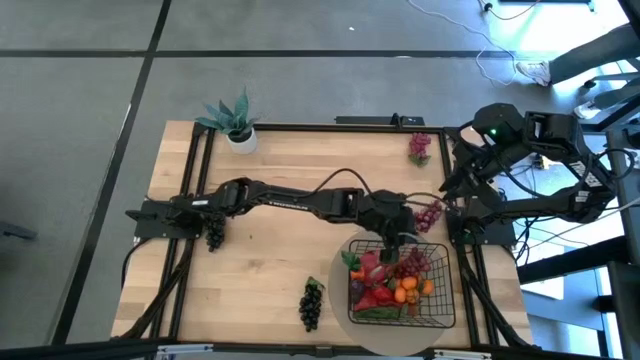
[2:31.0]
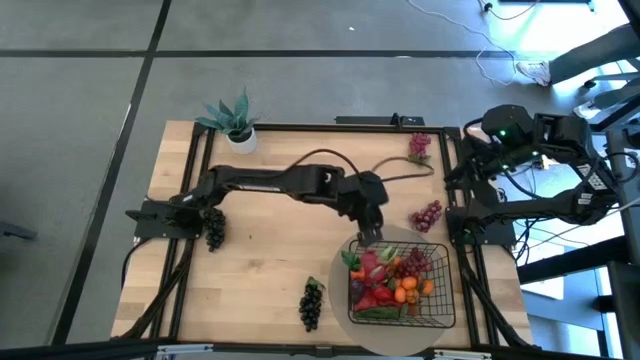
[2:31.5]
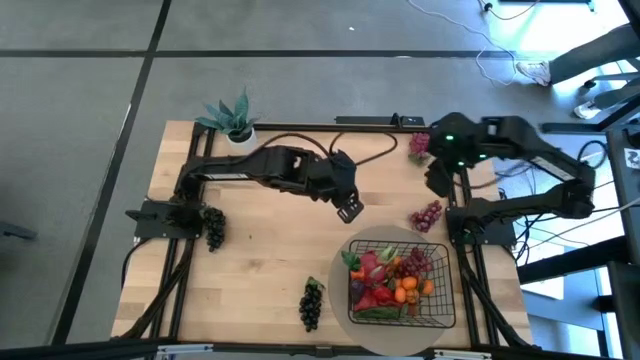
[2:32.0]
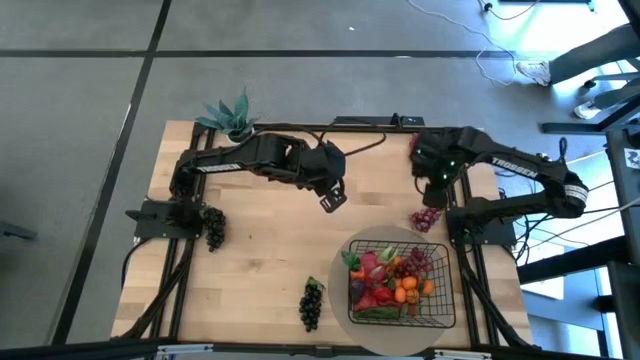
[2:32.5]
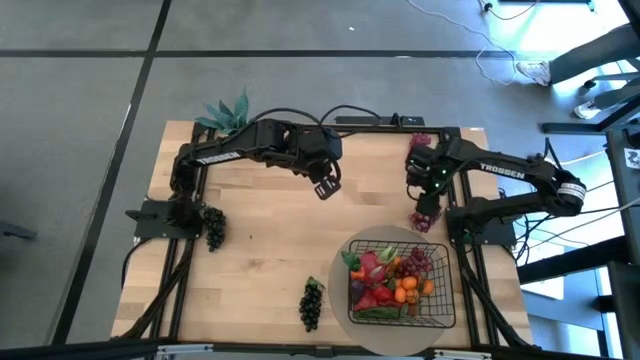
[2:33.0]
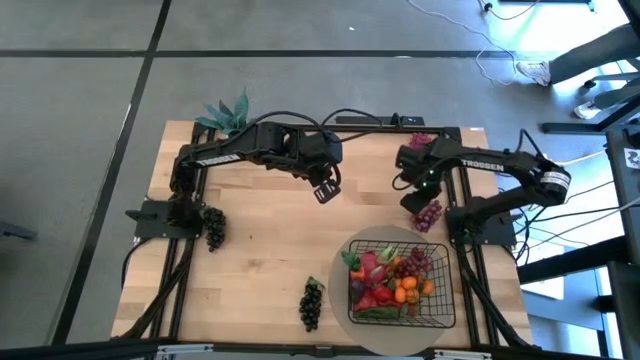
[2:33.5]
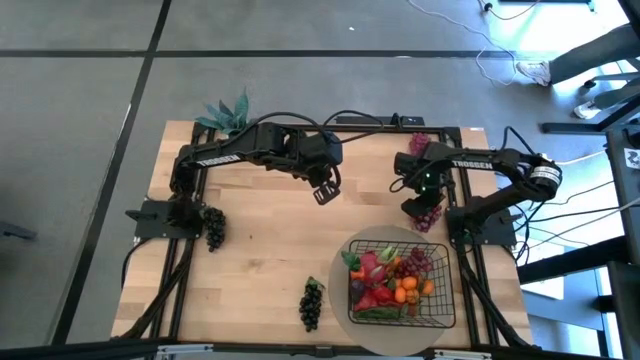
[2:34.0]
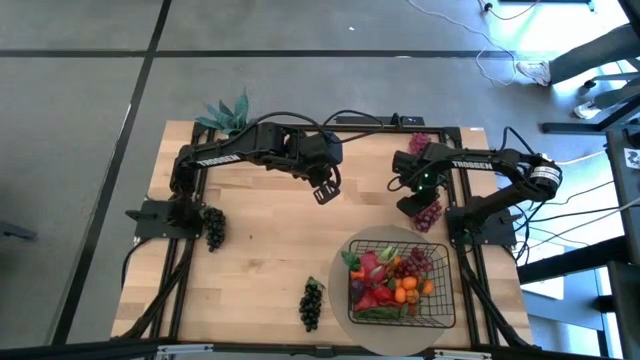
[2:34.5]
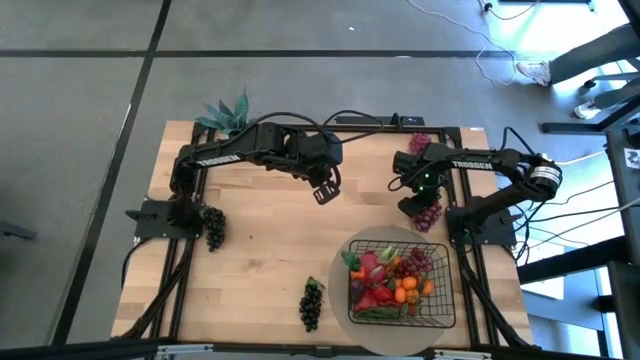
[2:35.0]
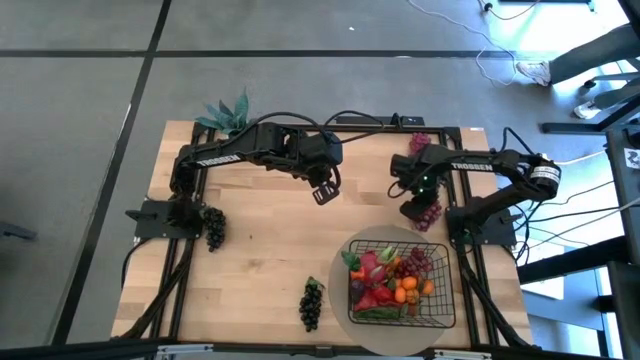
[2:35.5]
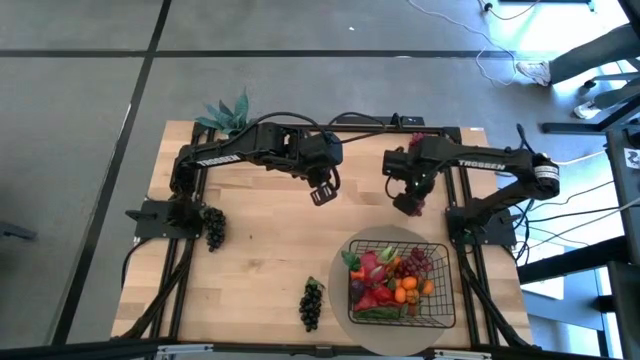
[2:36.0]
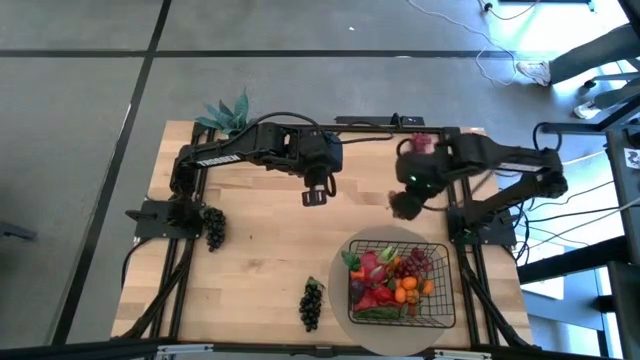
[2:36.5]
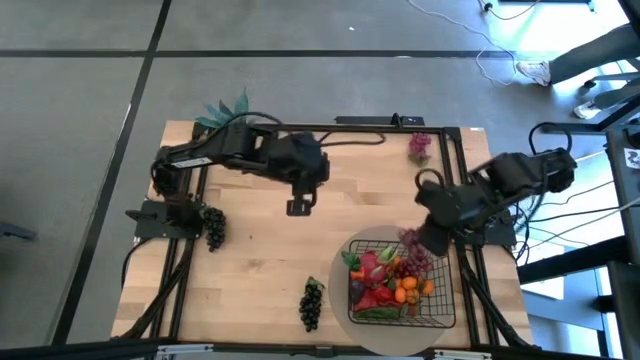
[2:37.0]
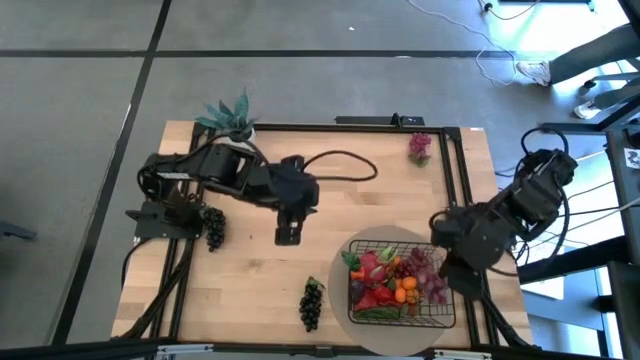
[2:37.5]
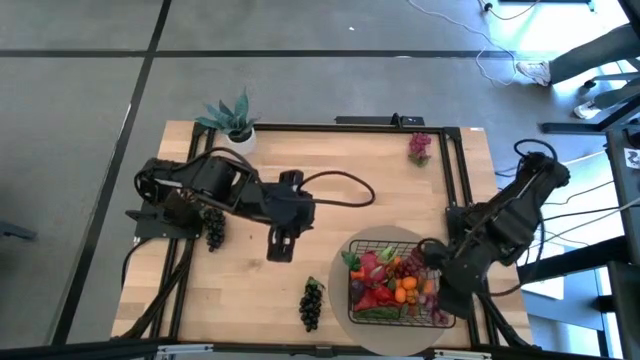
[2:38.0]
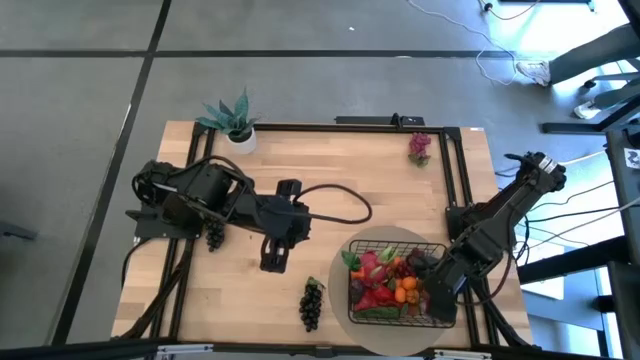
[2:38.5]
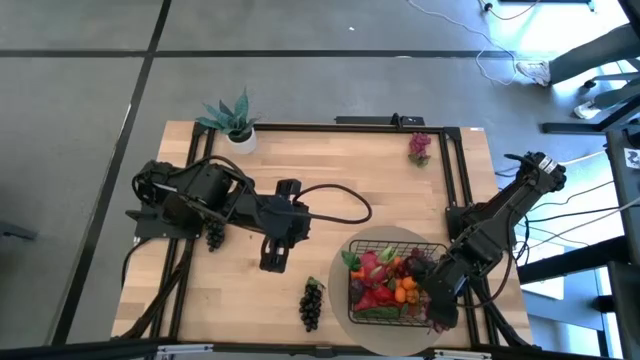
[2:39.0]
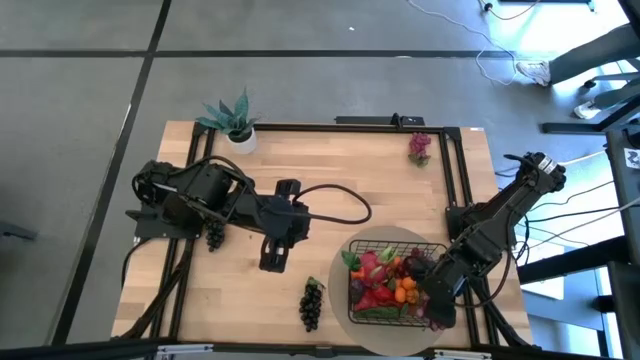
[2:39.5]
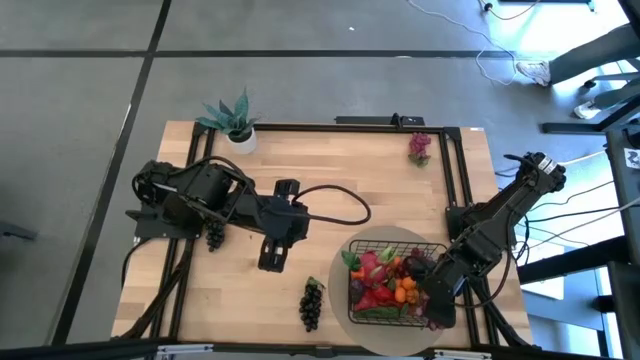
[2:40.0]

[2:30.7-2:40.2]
Task: Build produce basket
Put the bottom red grapes into the black wire basket

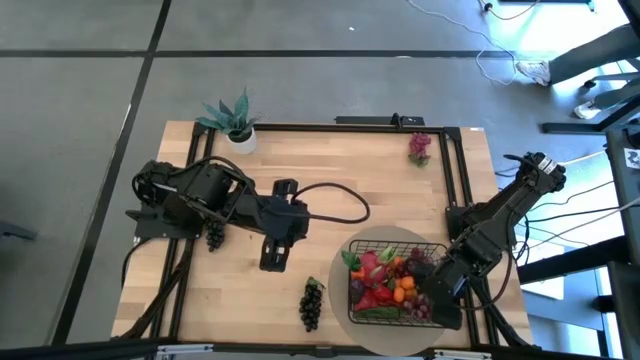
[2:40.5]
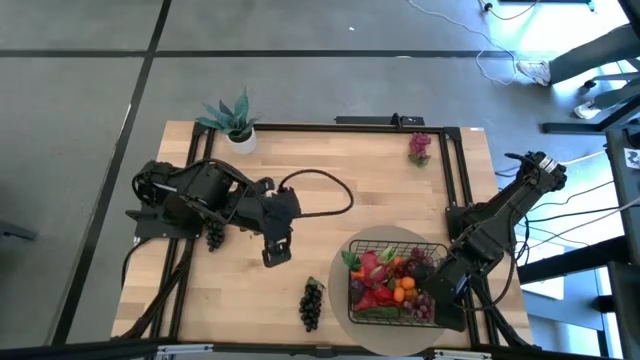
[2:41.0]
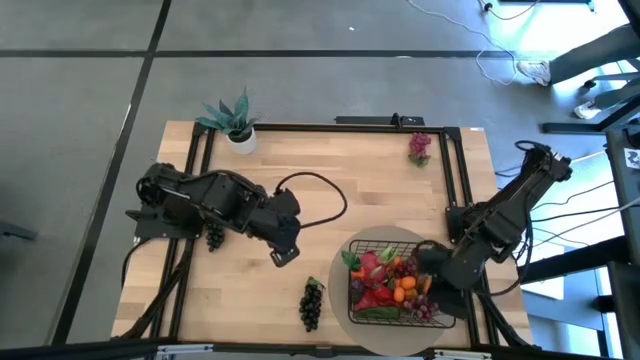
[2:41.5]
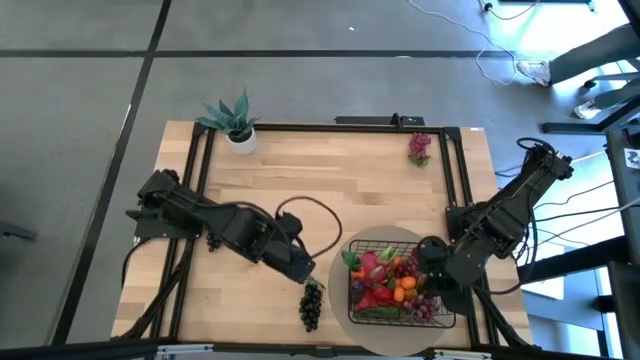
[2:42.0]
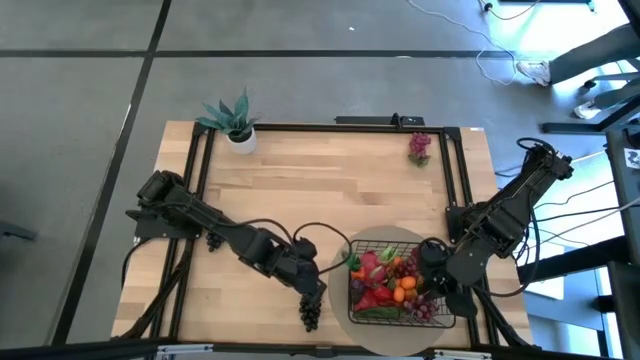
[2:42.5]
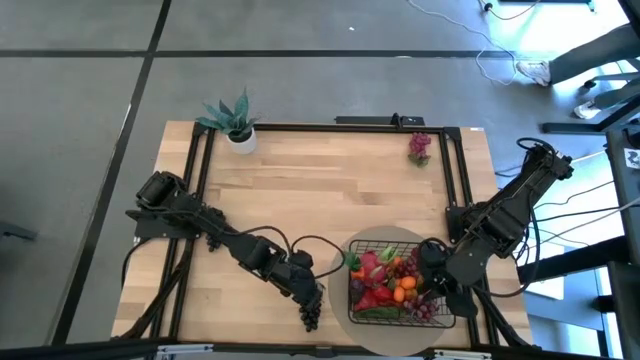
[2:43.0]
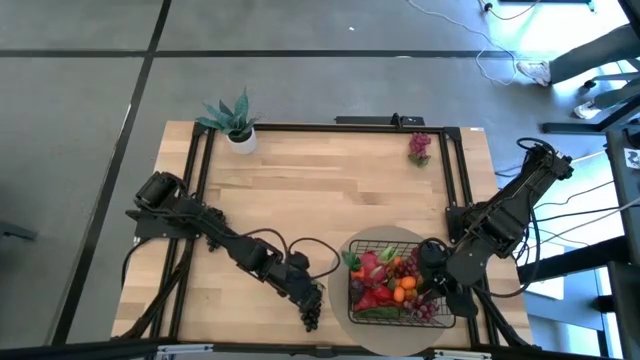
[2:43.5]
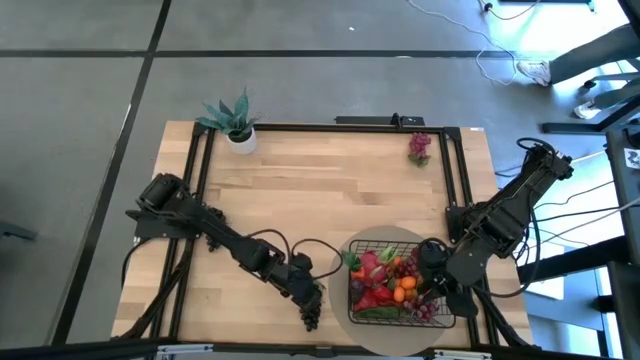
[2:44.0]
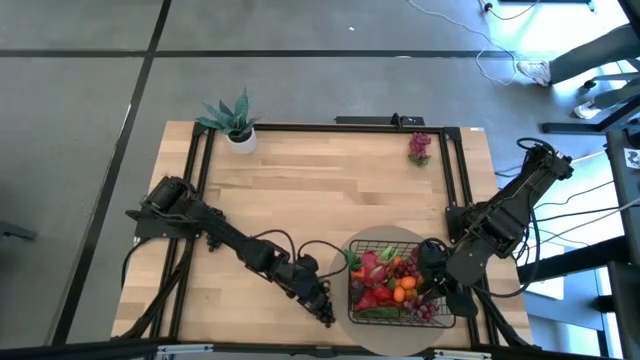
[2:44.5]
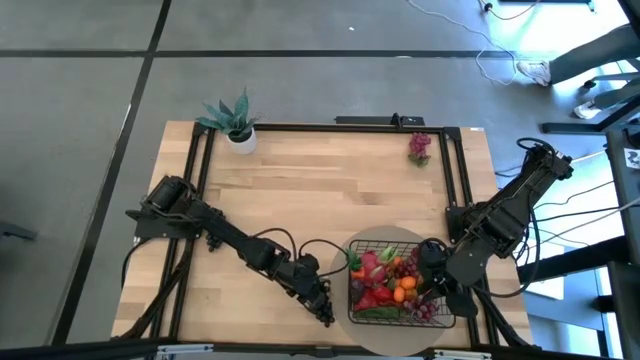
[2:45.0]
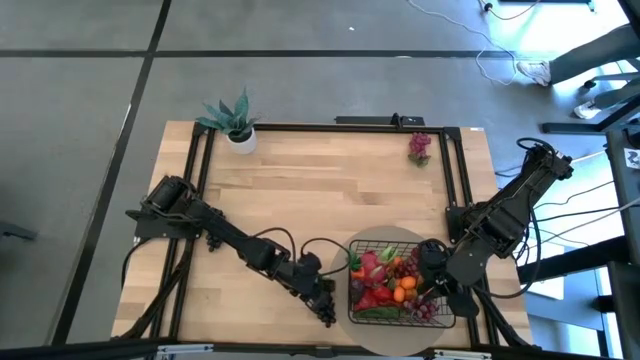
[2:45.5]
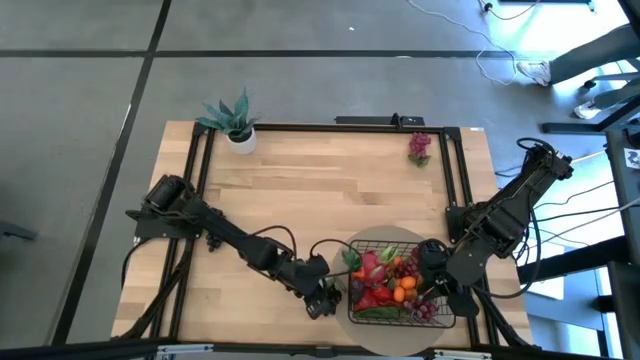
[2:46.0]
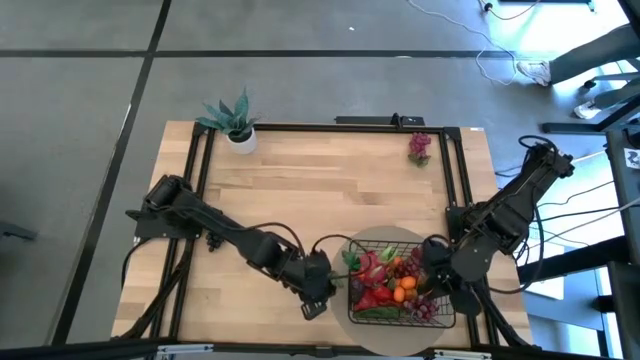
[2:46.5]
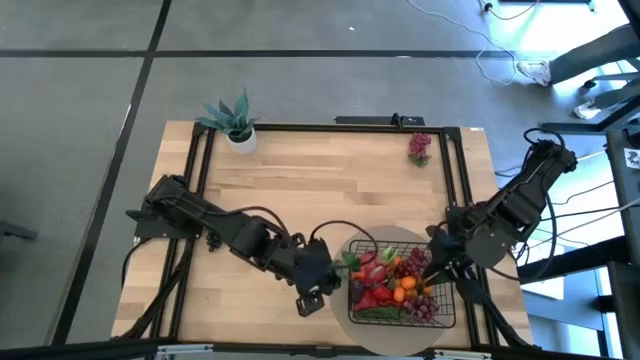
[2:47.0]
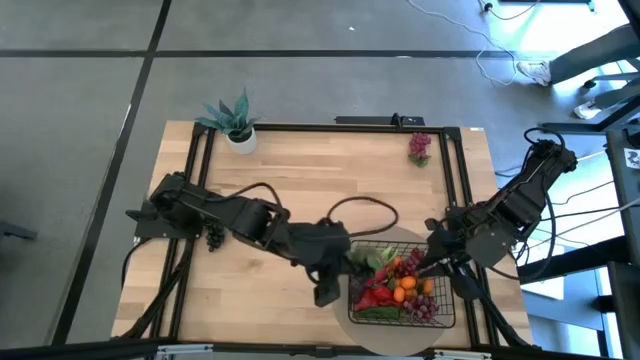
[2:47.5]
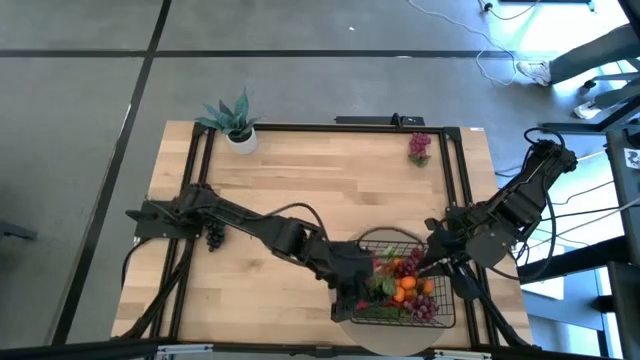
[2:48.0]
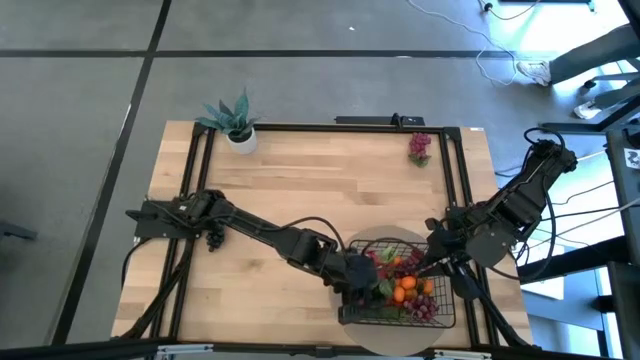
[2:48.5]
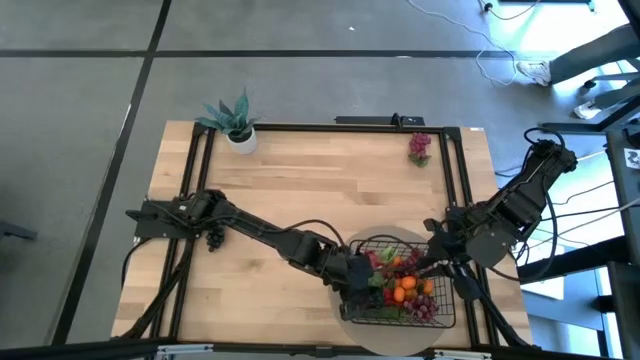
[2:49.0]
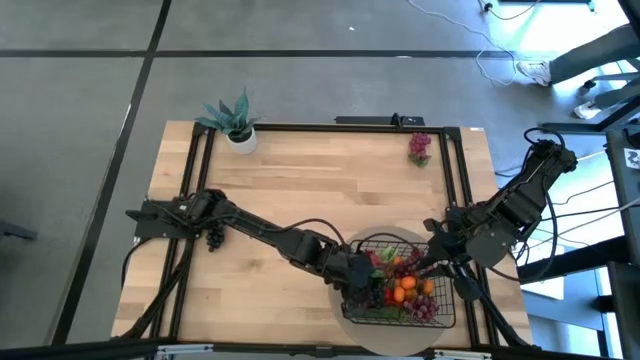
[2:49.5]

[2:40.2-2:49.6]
Put the bottom black grapes into the black wire basket

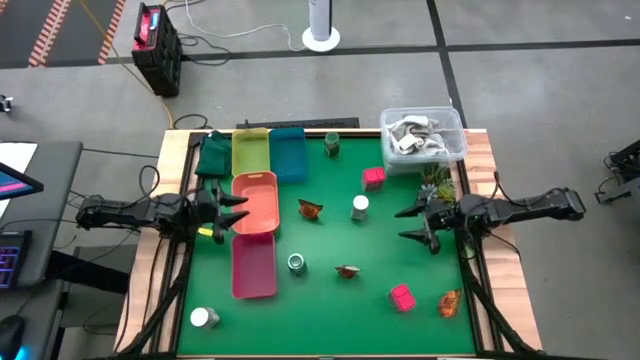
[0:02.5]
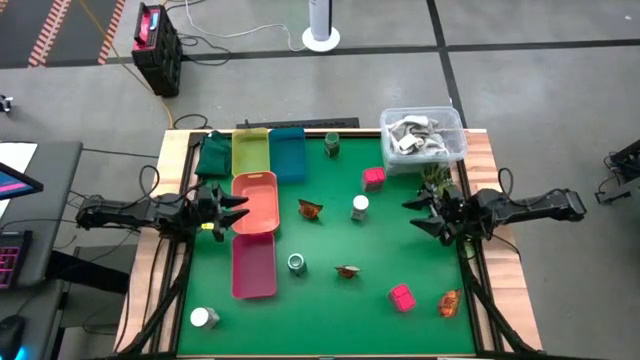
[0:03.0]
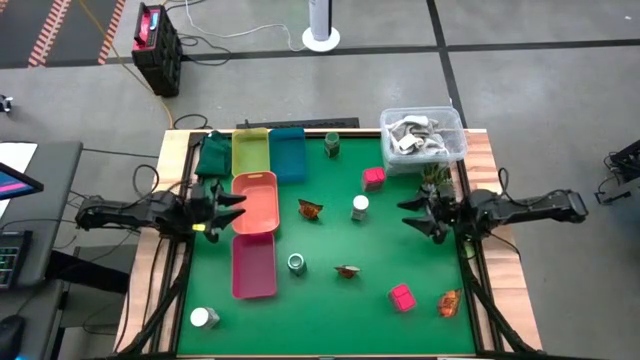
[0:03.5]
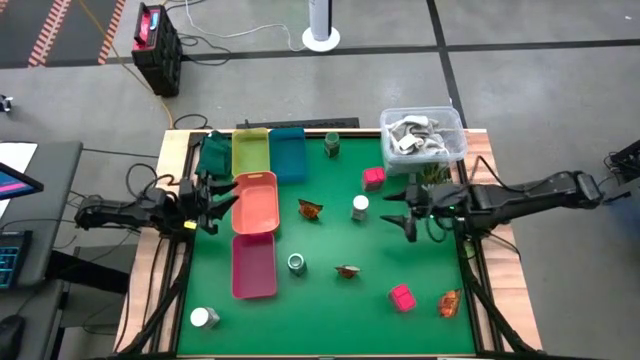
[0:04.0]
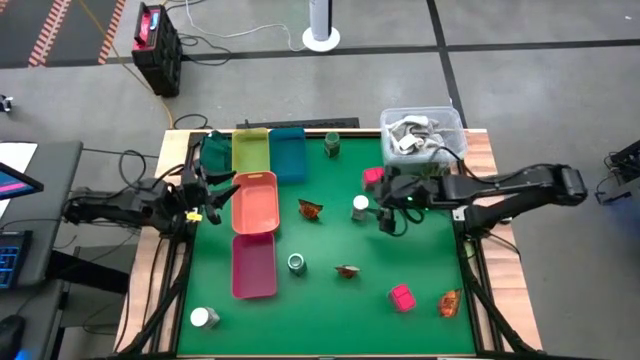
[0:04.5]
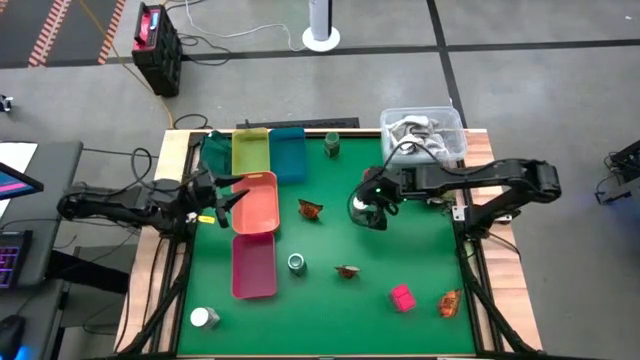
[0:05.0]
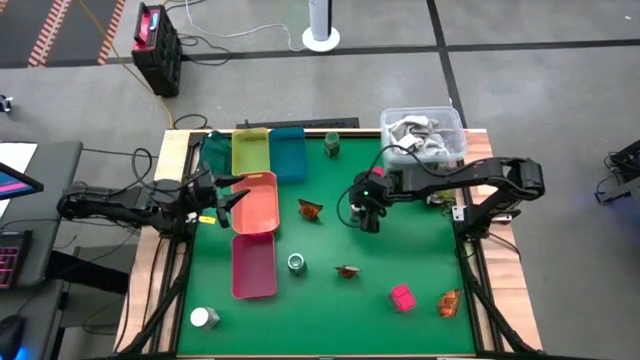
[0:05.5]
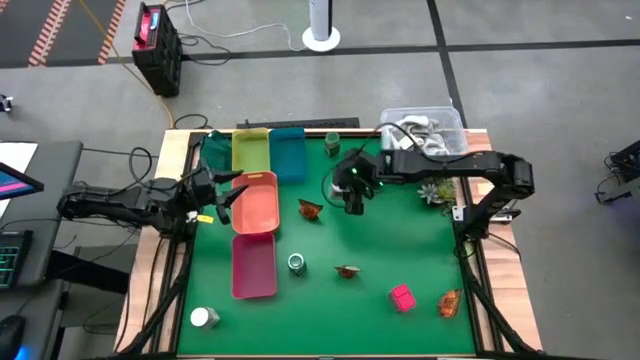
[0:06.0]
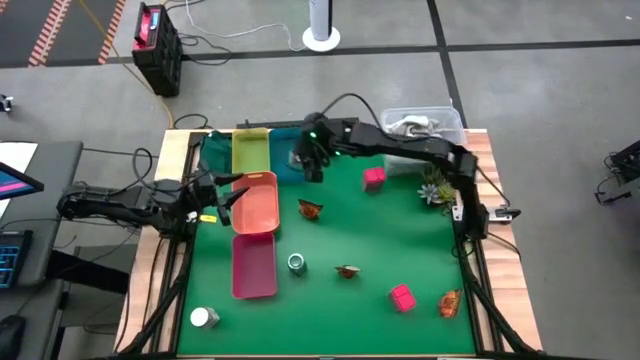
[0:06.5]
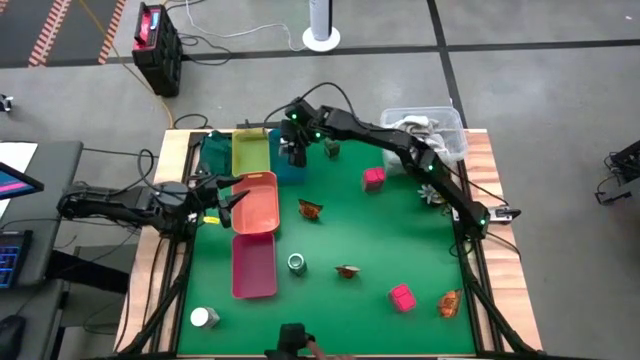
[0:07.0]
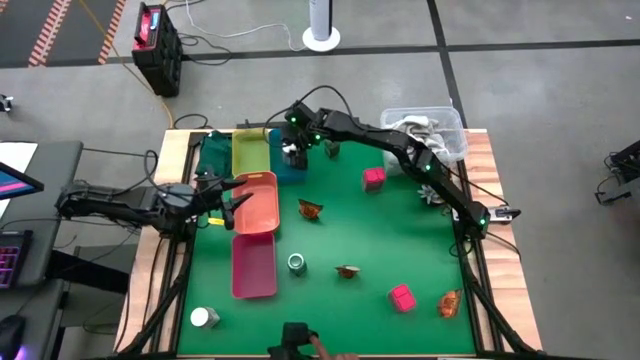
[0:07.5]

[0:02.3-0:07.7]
Task: Sort spices by type
Put the top white seasoning bottle into the blue bin
